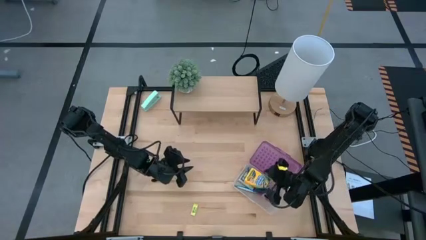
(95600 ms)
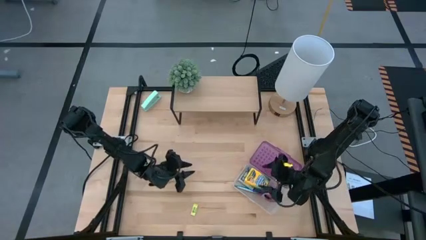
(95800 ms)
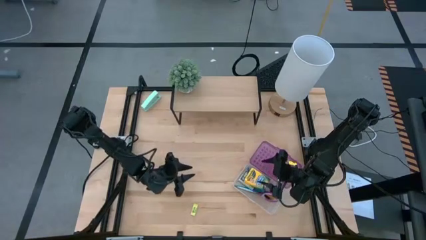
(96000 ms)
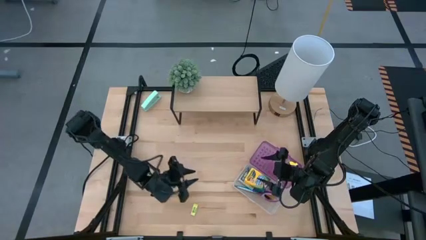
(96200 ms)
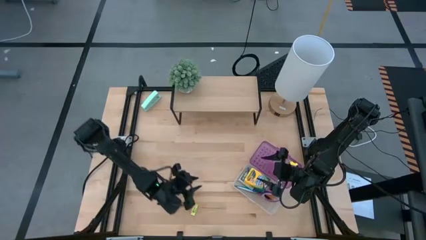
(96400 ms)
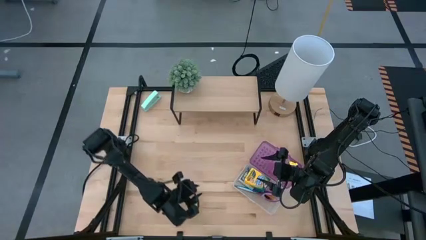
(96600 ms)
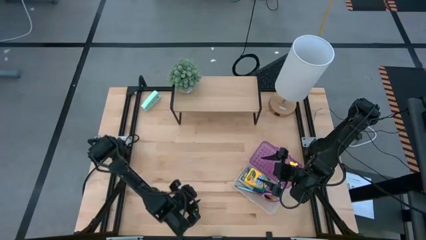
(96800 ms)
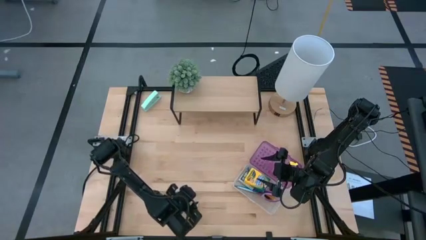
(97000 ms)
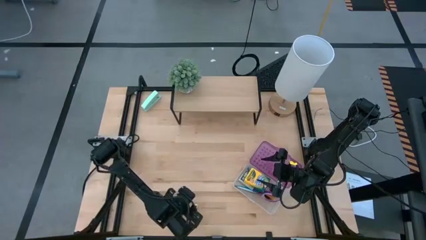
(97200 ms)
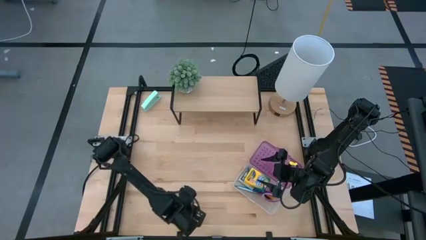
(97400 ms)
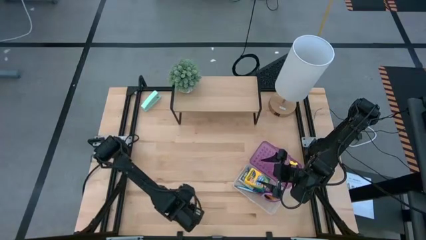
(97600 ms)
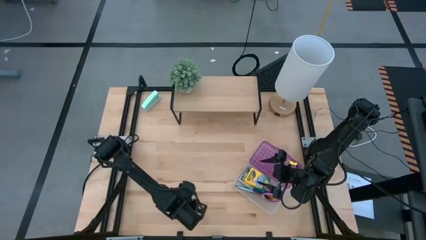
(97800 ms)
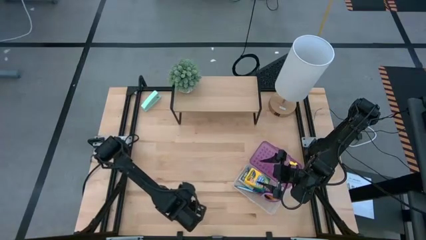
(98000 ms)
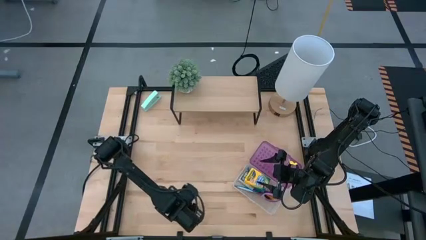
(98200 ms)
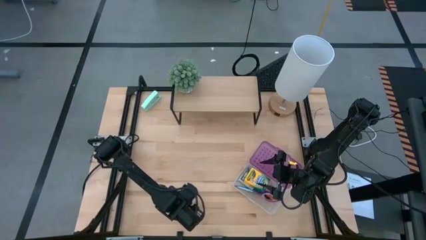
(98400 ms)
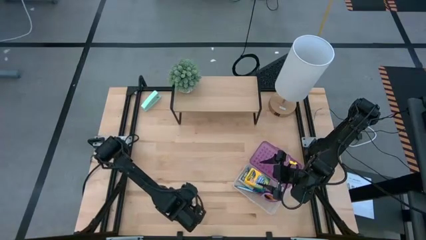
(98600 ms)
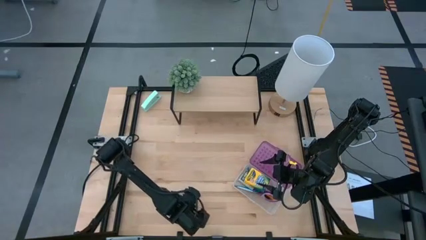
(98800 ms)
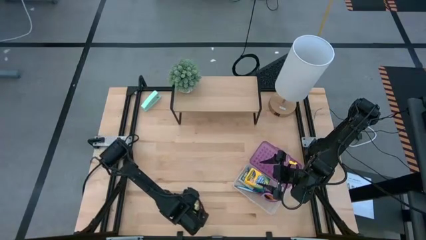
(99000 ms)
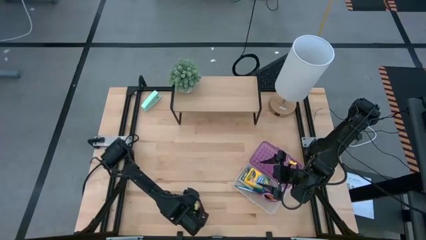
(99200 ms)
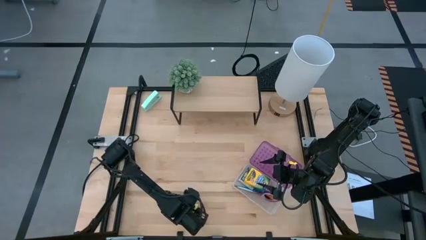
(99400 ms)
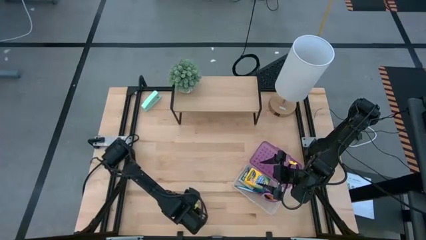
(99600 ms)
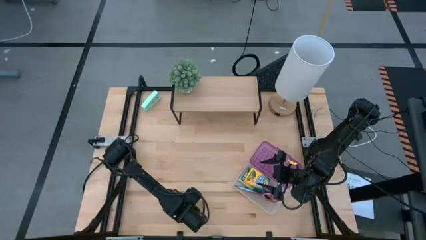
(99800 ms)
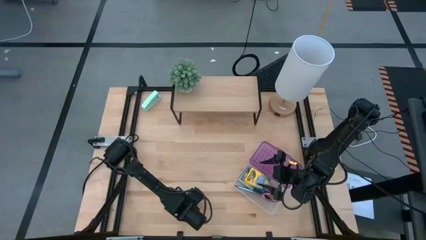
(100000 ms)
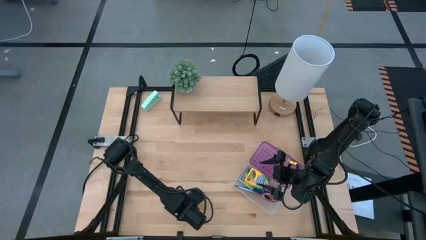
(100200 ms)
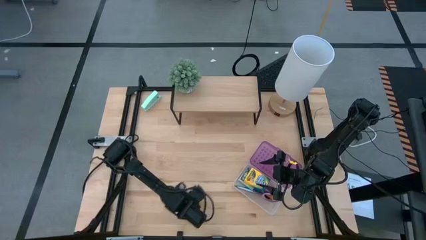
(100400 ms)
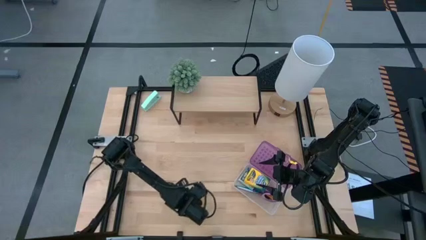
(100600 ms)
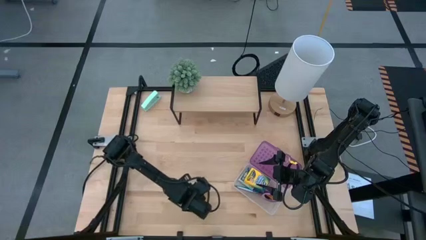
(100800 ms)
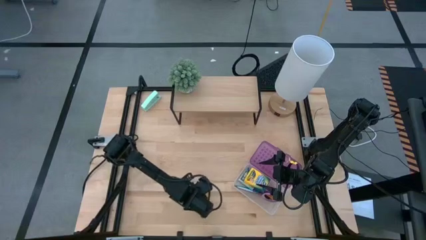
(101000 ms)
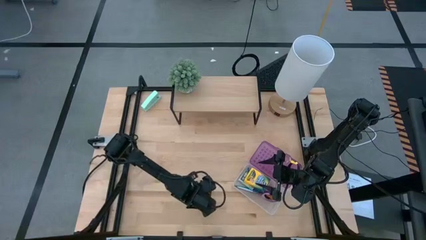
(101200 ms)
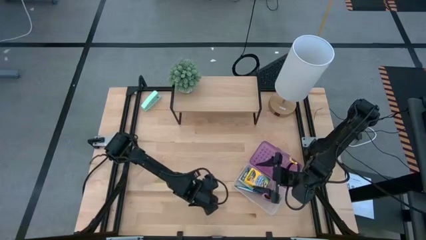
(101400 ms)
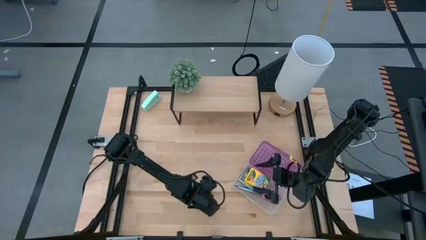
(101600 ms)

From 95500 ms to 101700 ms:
Task: Pack school essentials
Put the yellow eraser into the purple supply box

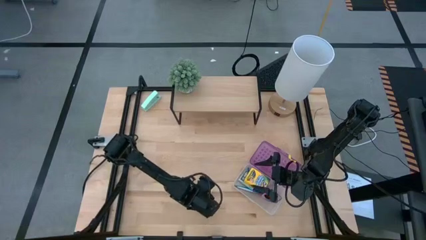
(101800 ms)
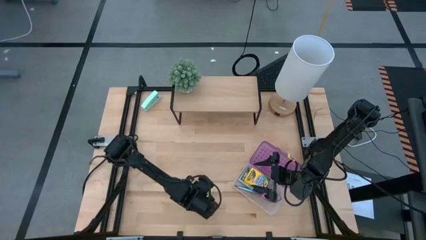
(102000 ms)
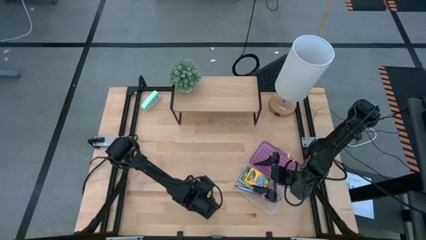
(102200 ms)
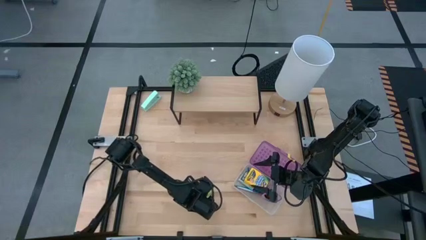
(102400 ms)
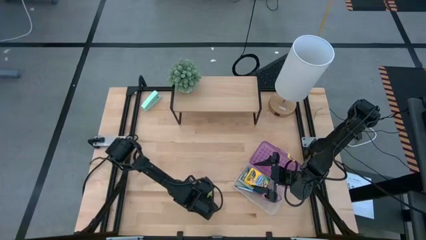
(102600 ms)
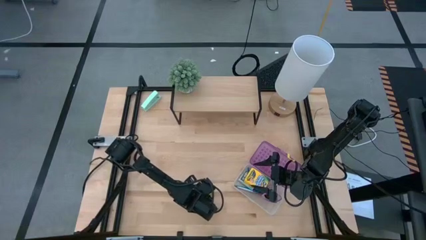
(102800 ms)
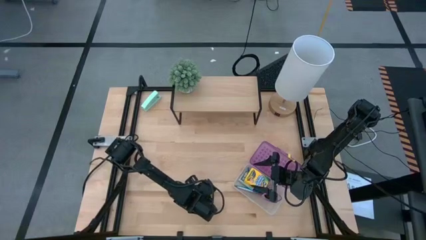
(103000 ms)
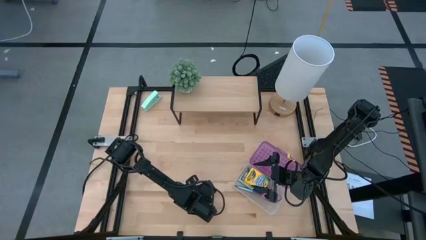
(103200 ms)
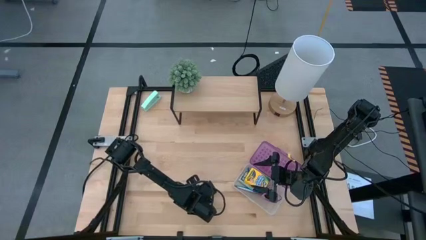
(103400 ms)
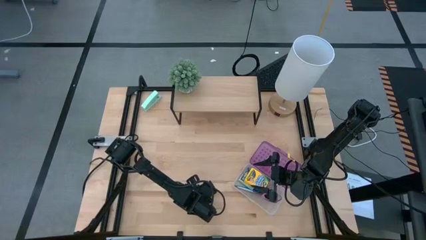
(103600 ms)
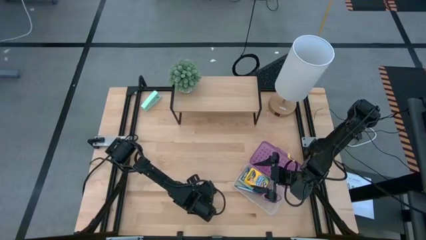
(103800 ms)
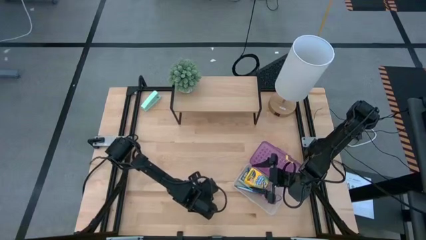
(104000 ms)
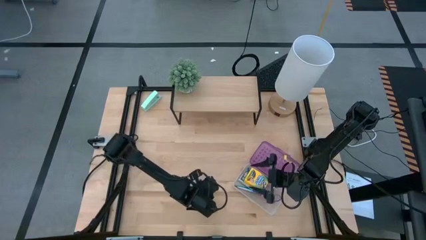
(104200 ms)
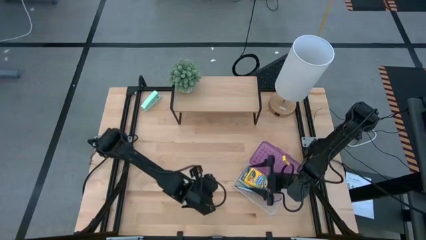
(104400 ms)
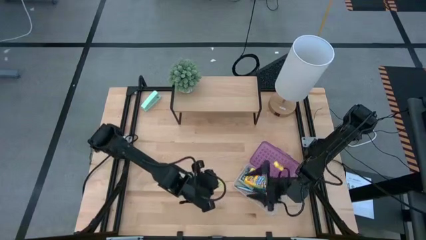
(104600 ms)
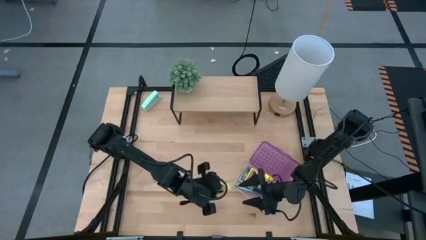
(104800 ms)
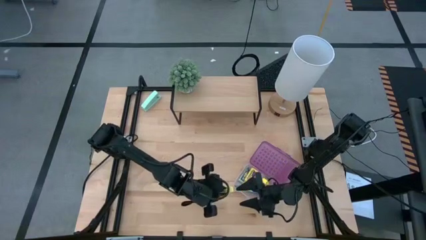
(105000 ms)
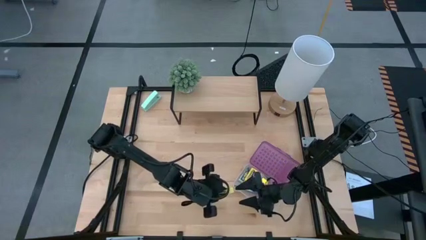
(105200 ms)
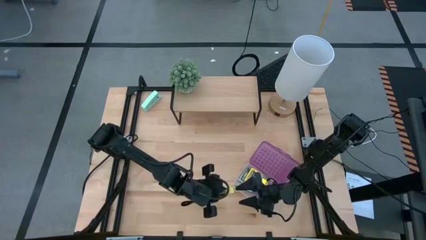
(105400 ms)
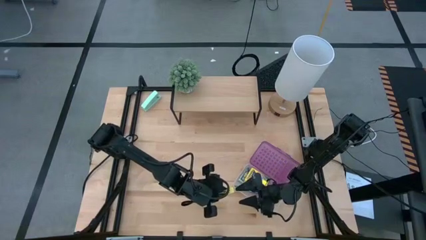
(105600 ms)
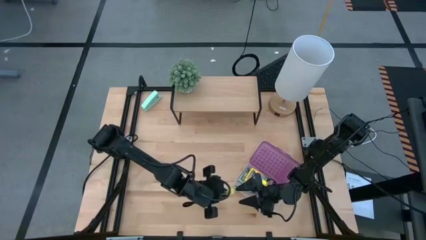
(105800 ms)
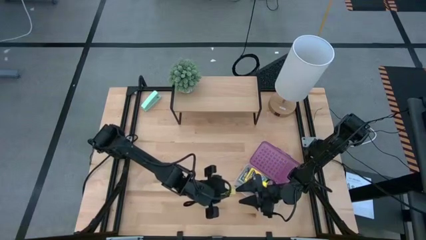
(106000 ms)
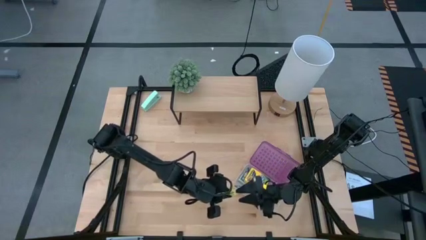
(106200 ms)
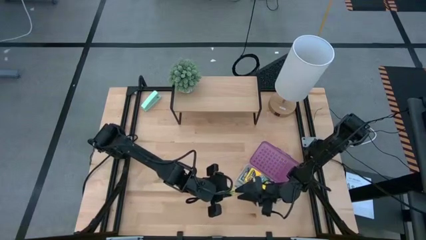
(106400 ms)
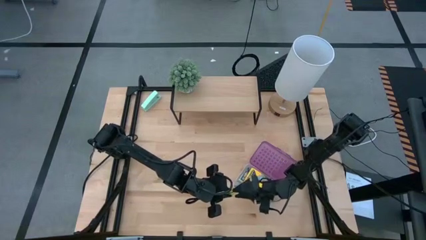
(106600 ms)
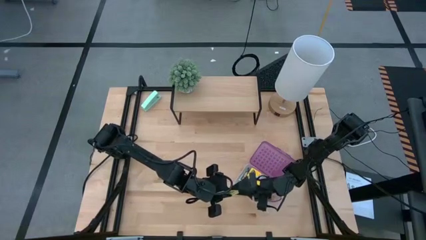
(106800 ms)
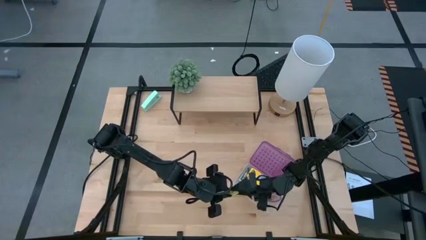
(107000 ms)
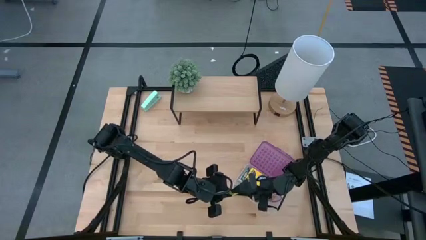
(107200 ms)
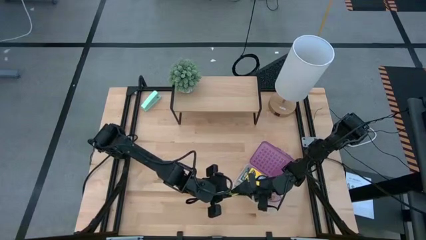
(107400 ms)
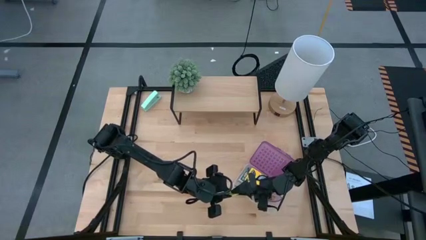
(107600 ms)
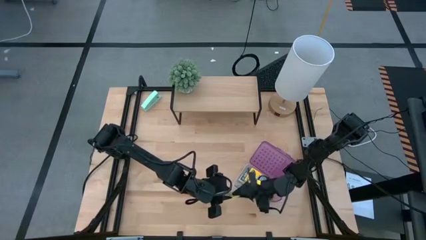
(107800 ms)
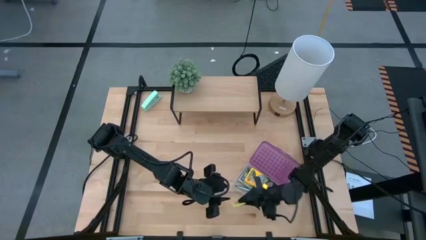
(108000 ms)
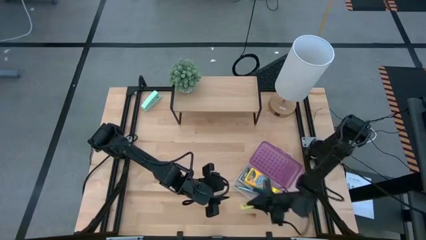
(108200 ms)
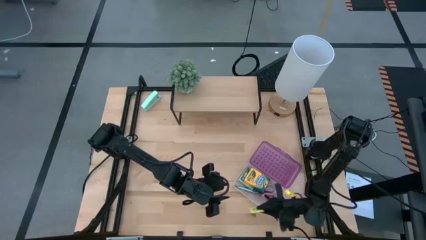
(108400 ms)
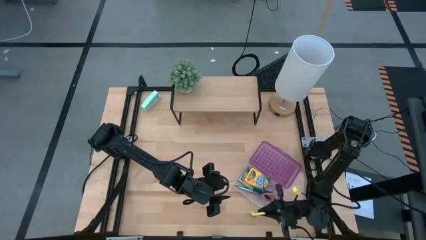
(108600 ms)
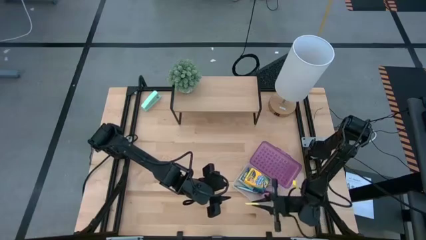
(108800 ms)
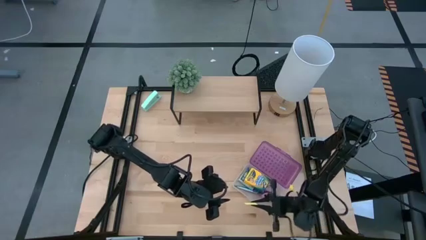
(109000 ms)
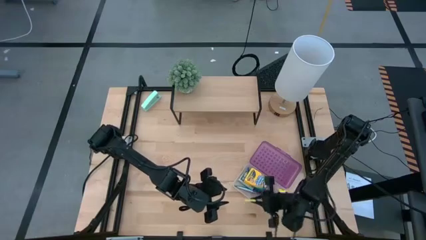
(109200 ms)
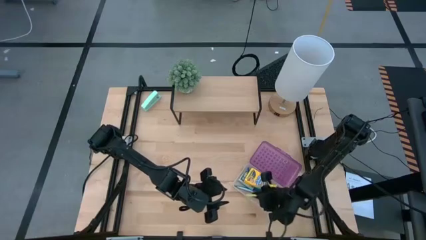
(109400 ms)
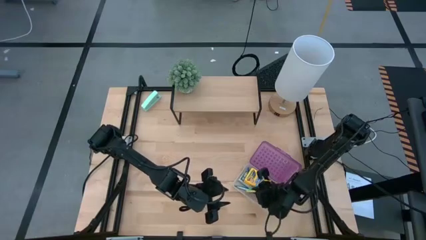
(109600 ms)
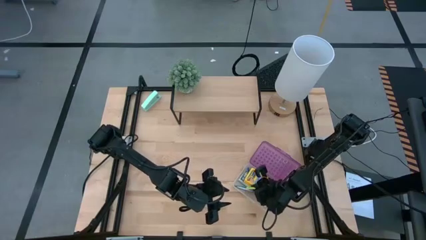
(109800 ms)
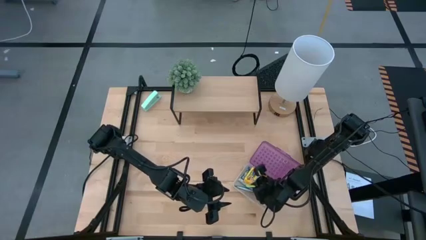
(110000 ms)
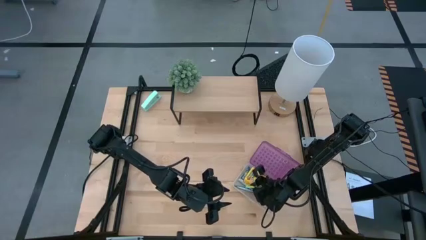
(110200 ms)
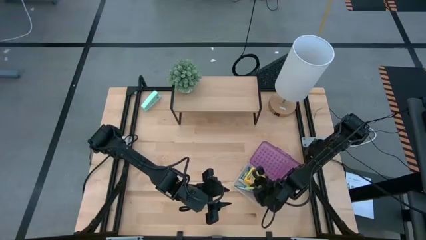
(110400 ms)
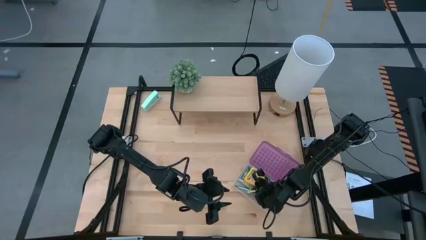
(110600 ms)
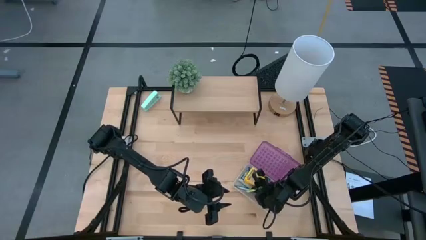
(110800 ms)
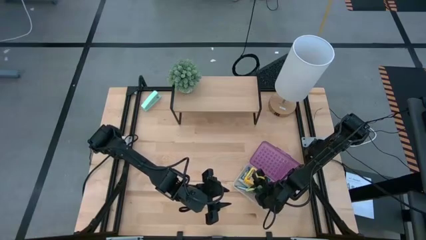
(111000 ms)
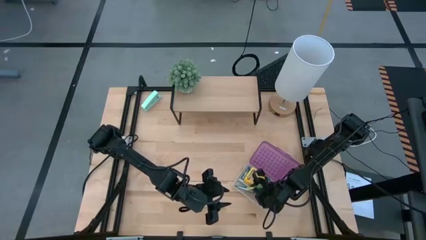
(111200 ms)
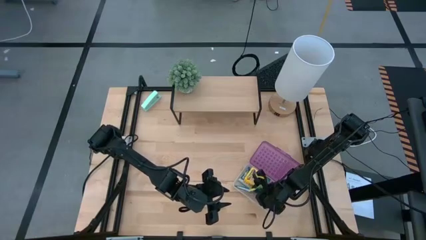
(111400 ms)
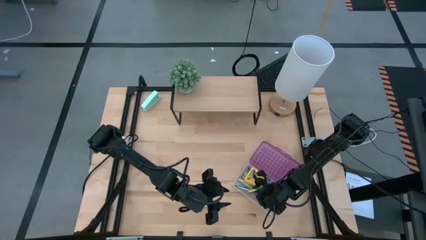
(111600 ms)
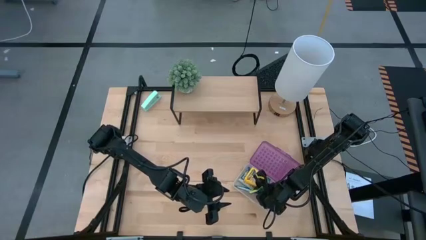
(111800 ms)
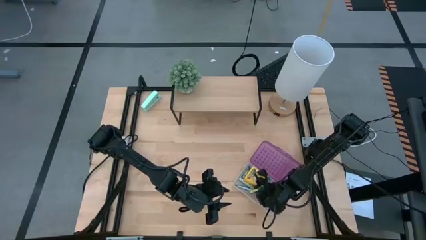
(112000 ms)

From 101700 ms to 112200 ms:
Put the yellow eraser into the purple supply box
